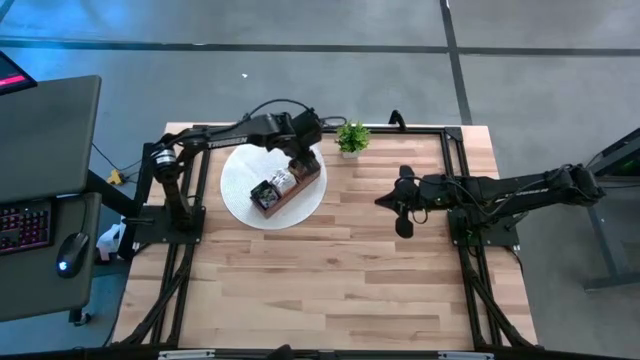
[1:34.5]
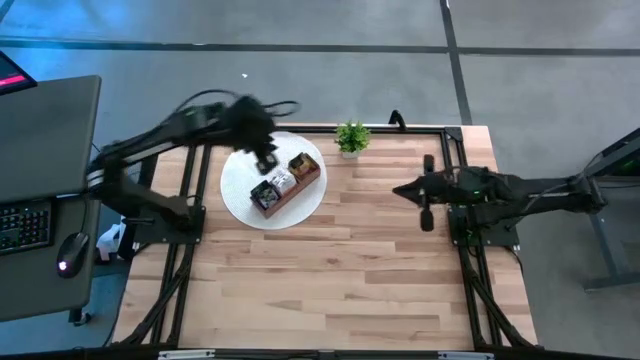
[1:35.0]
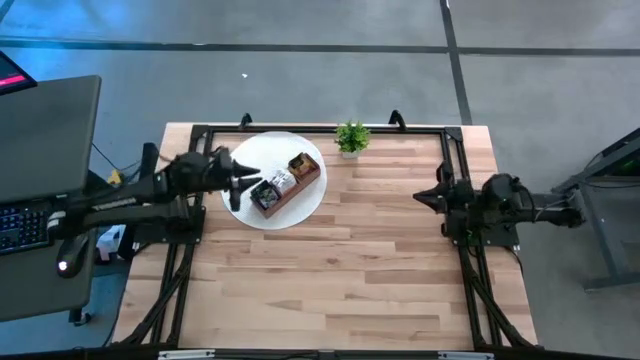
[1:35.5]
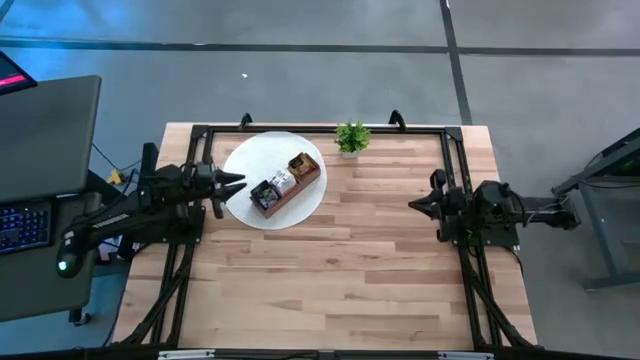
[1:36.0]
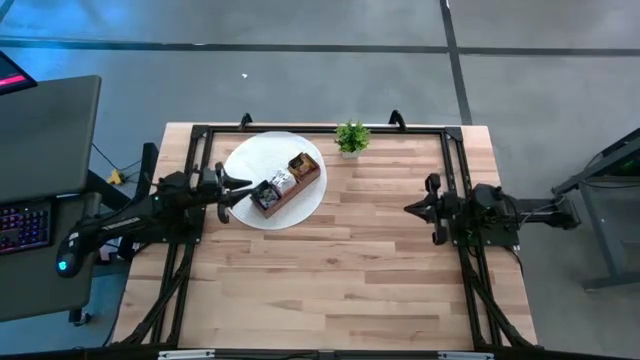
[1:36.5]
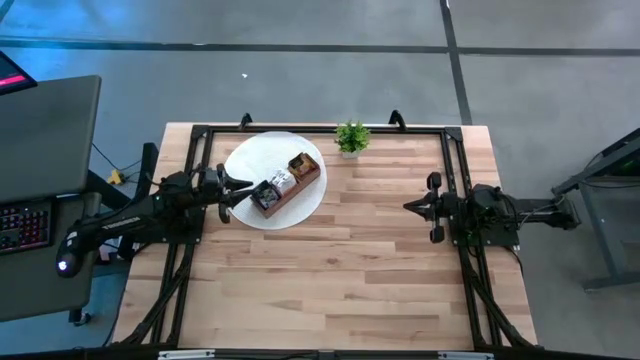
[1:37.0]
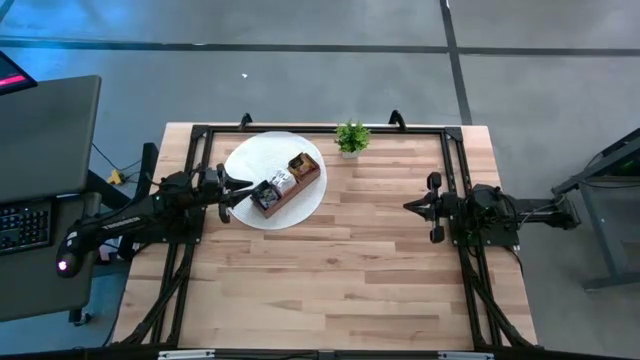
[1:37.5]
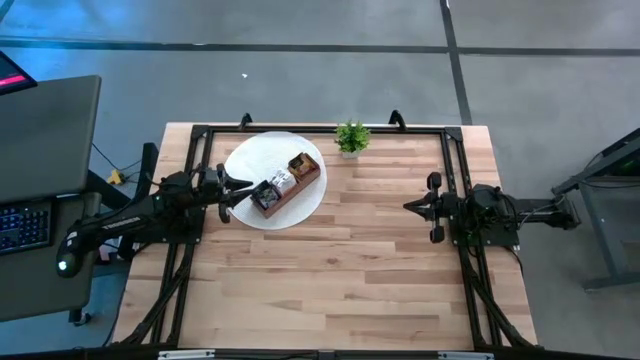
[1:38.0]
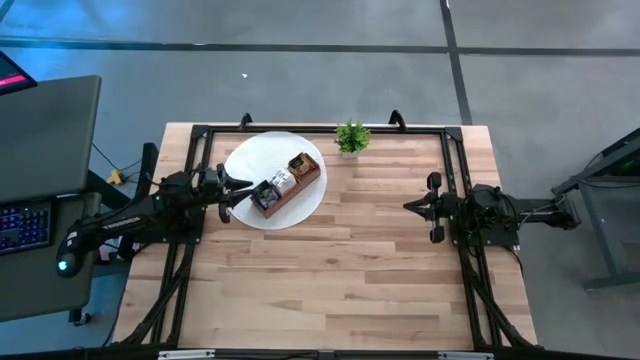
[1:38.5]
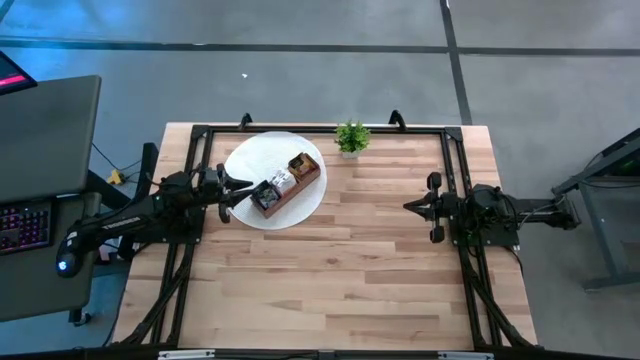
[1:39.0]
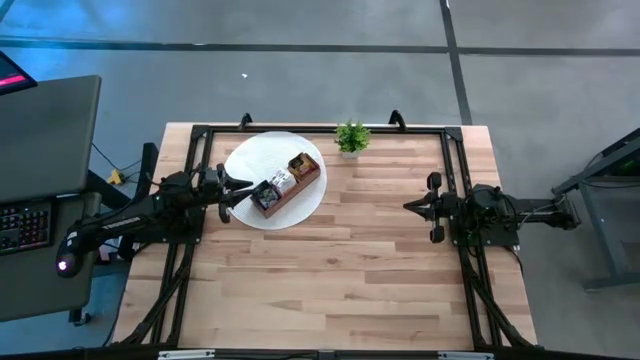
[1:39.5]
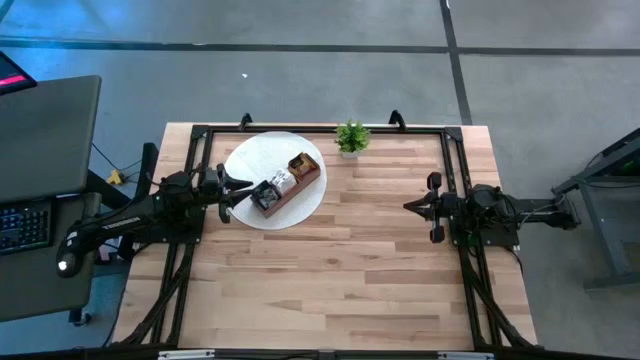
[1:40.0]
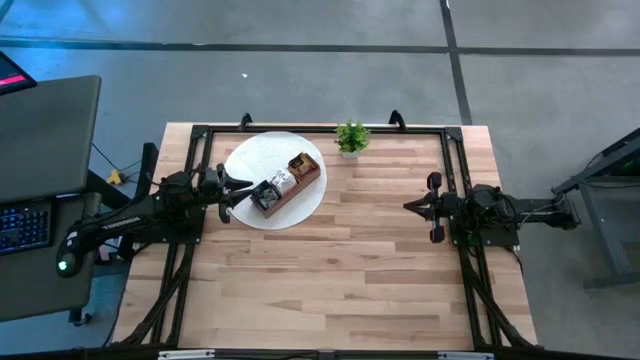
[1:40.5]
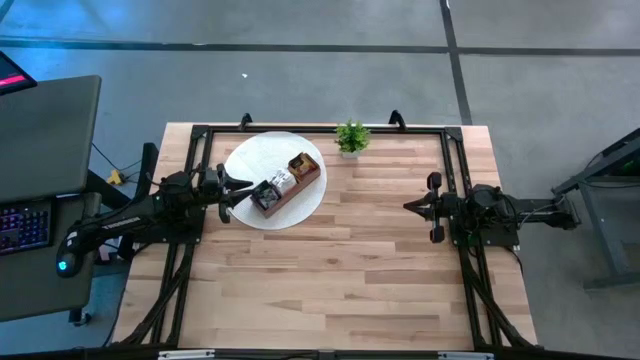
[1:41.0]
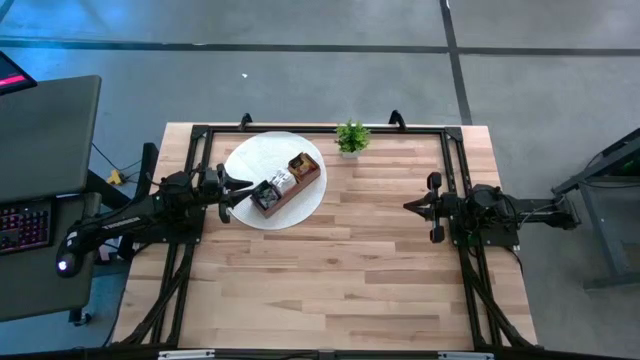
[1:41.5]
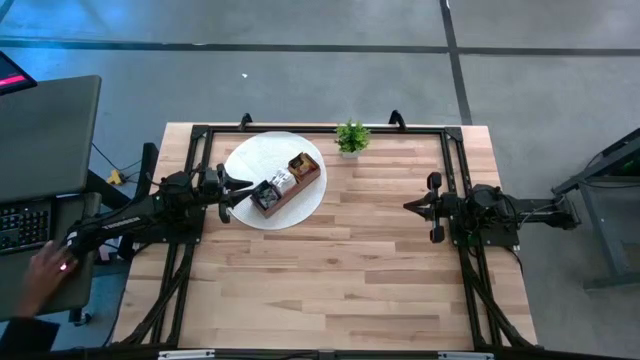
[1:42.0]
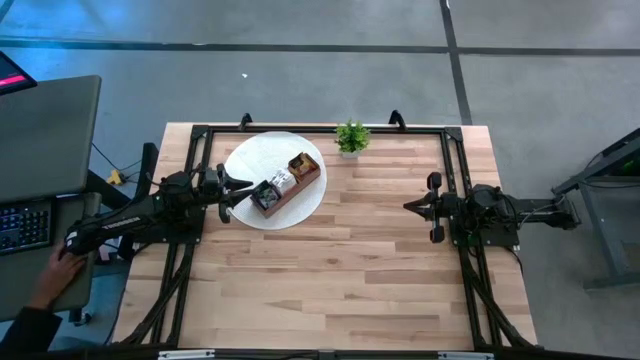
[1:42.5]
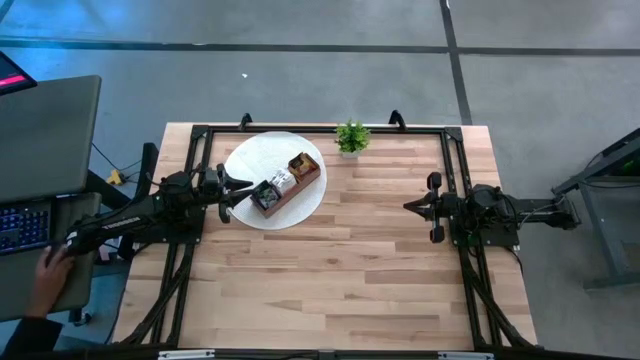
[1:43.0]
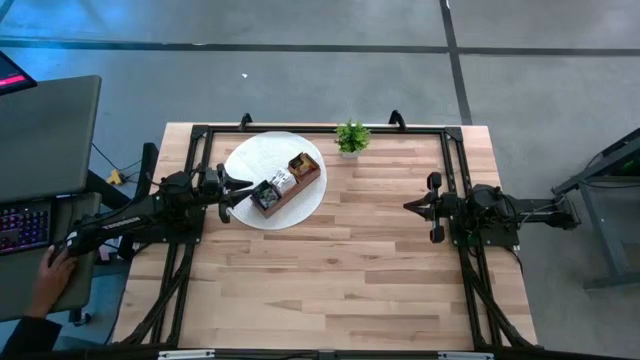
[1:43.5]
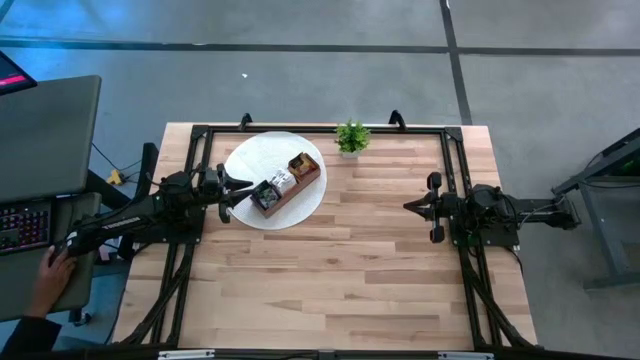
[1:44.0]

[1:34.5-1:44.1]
Task: Pick & Place Tea
Return to Home Position

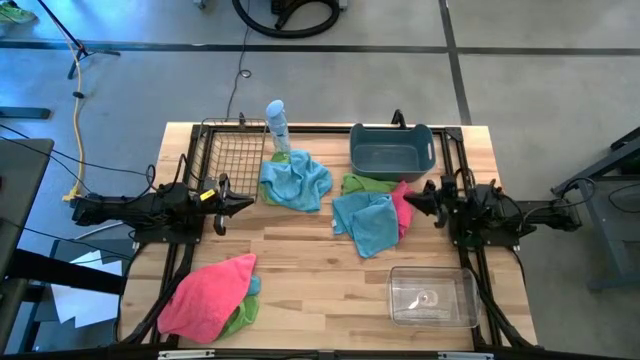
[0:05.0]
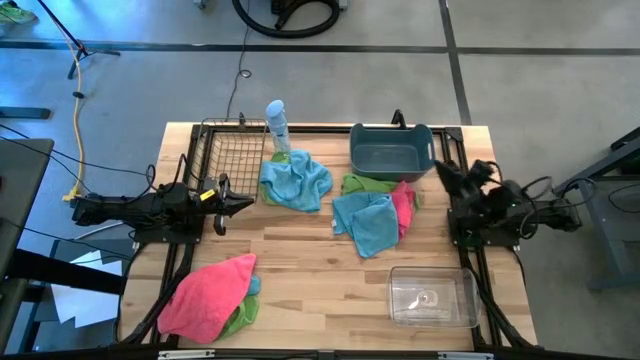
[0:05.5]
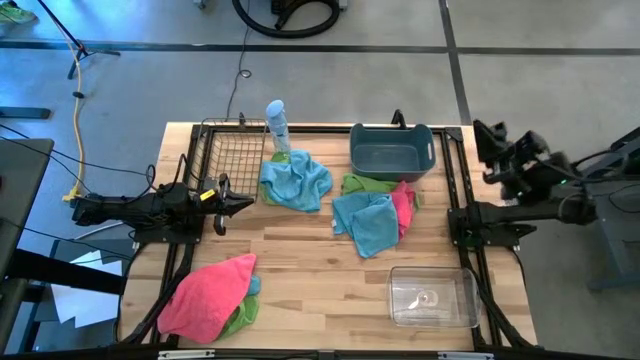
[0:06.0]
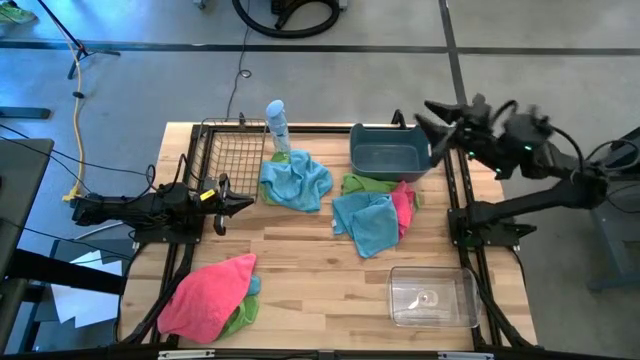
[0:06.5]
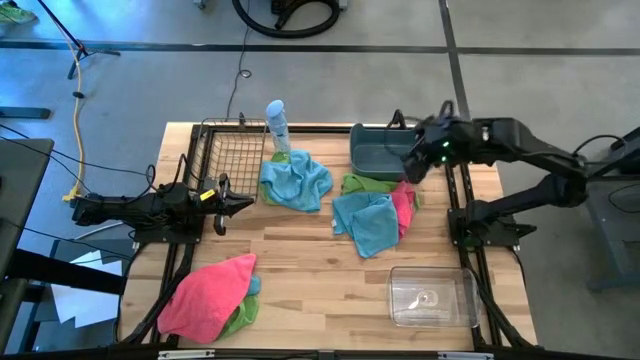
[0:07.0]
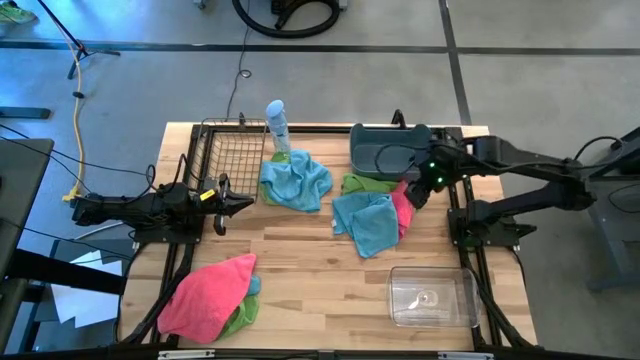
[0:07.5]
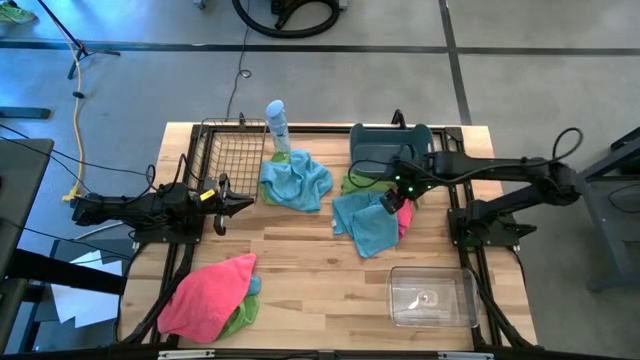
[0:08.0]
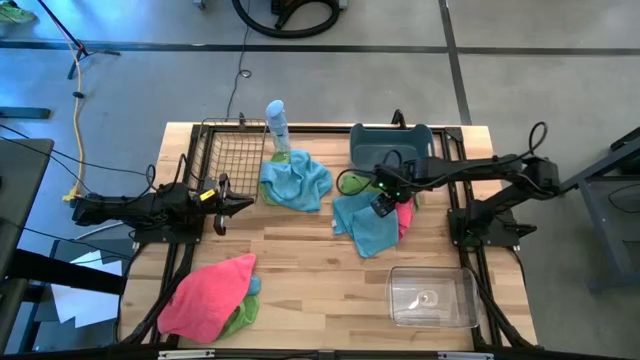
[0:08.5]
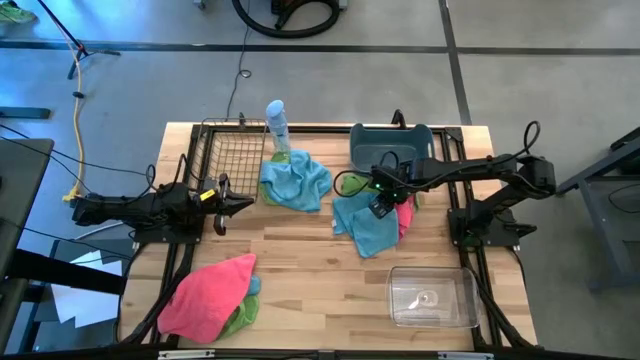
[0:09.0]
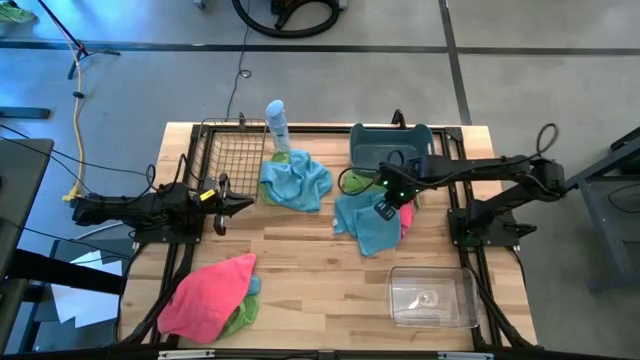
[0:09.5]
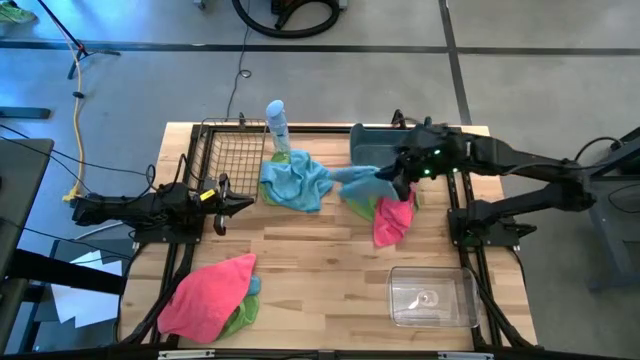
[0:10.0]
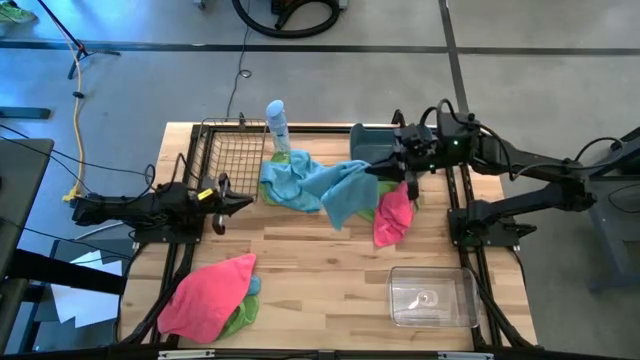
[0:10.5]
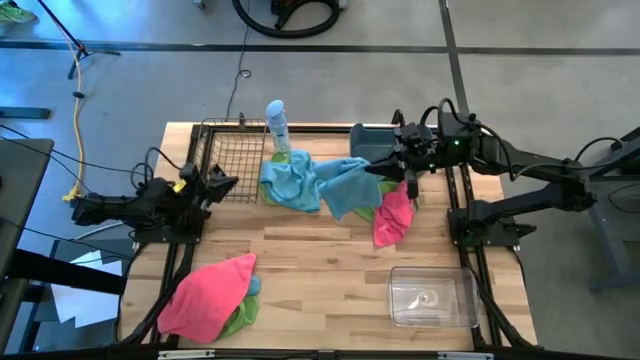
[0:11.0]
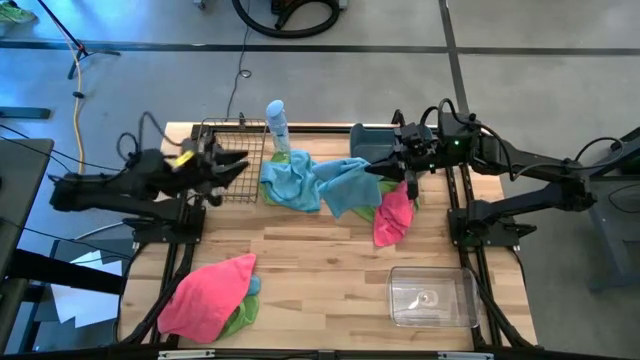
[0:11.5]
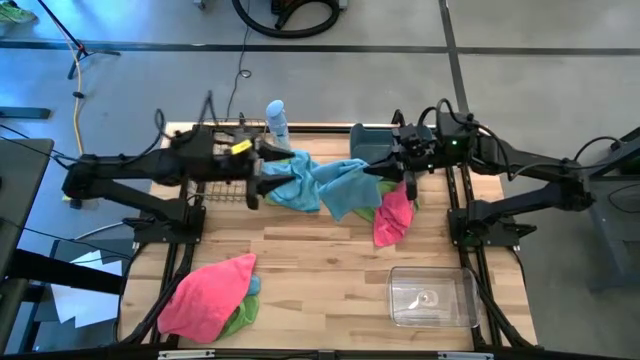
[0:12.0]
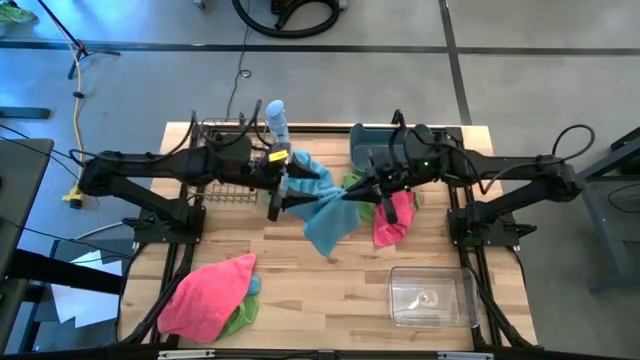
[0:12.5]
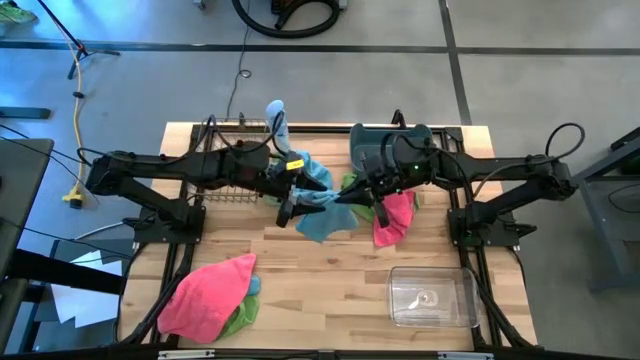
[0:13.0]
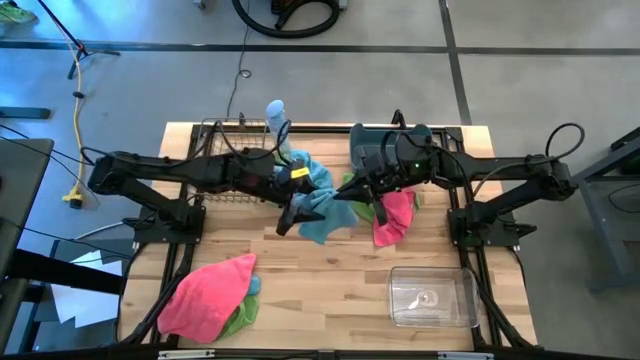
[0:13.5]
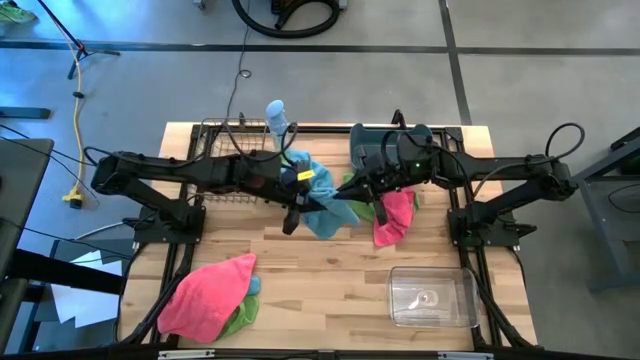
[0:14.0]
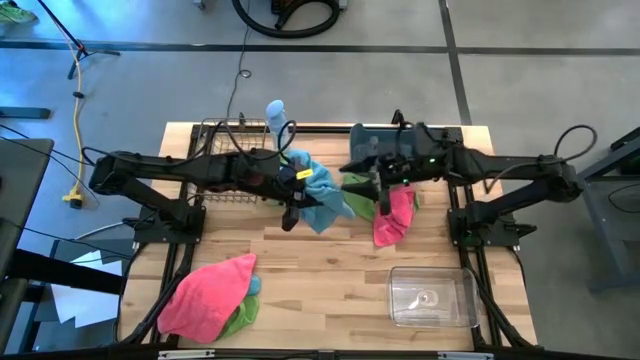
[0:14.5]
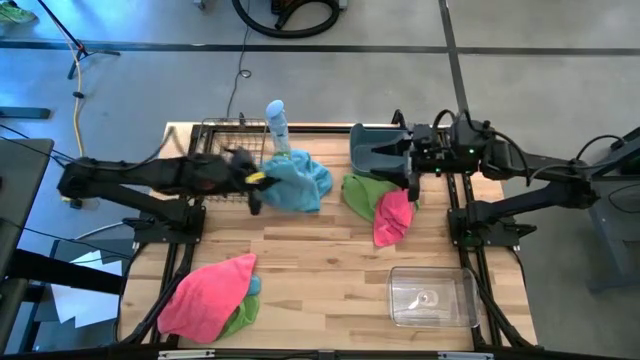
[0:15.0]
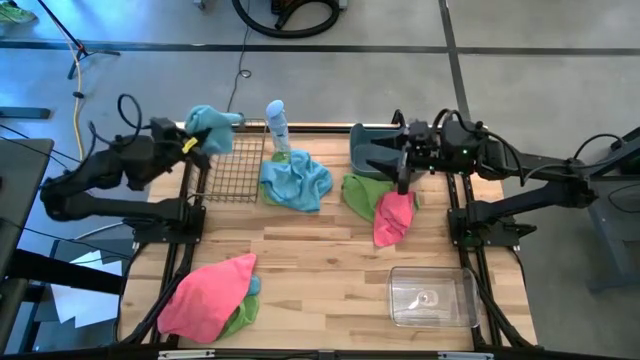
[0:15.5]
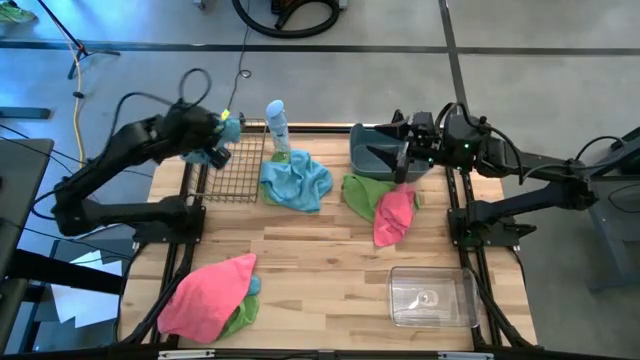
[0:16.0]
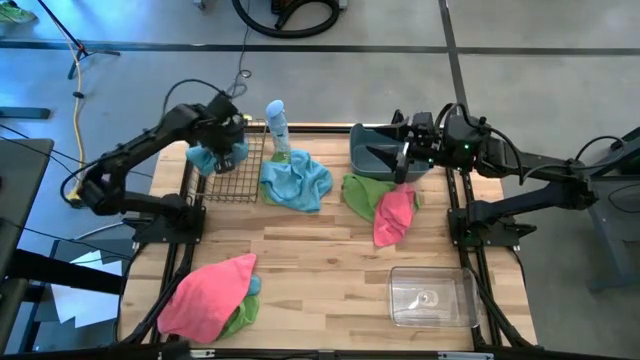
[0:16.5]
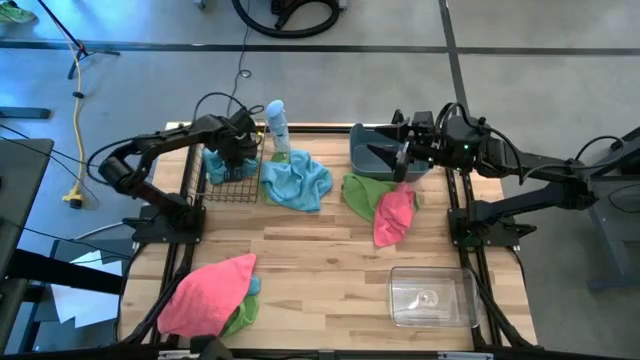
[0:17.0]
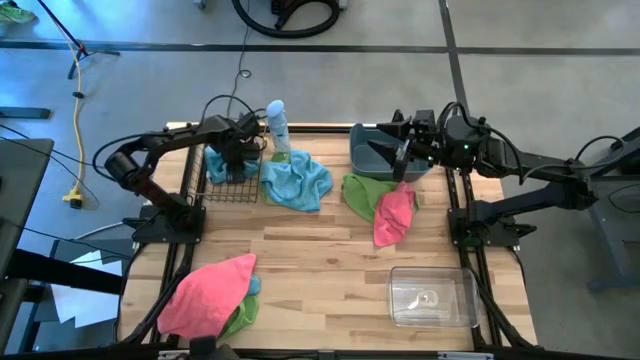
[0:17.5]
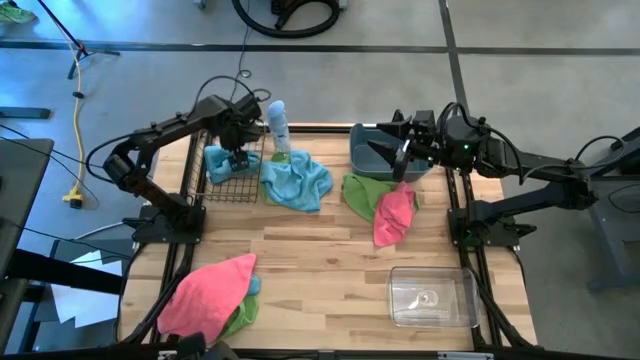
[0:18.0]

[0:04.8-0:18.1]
Task: Sort microfiber towel by color & place in baskets
Put the top right blue towel into the wire basket
